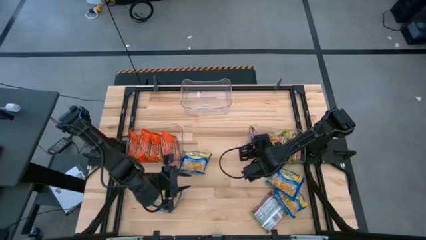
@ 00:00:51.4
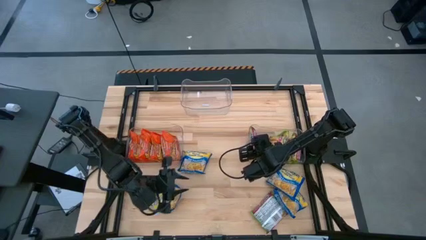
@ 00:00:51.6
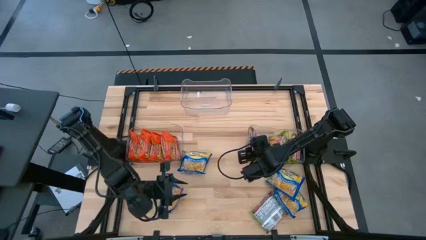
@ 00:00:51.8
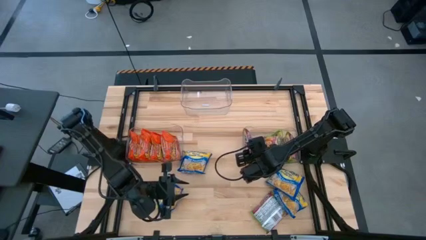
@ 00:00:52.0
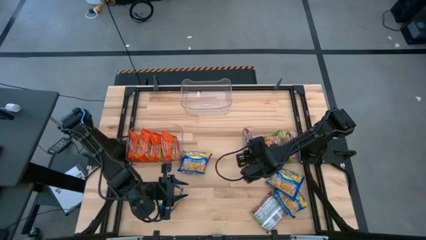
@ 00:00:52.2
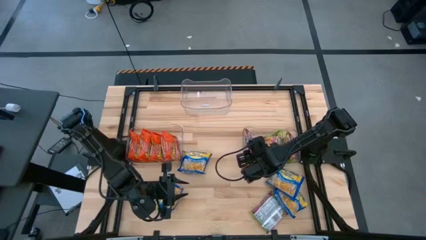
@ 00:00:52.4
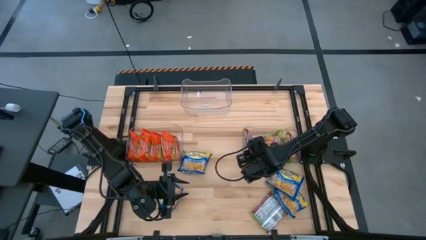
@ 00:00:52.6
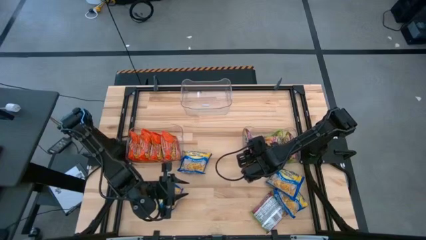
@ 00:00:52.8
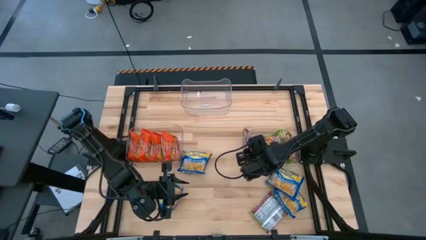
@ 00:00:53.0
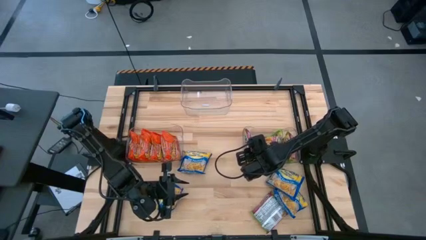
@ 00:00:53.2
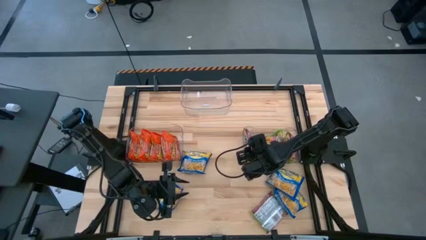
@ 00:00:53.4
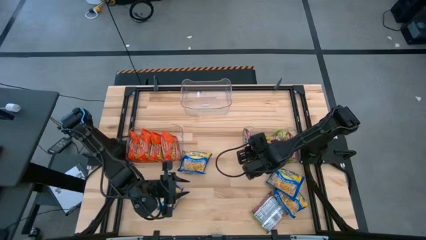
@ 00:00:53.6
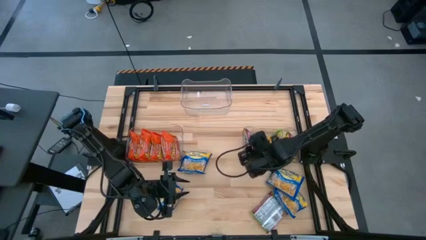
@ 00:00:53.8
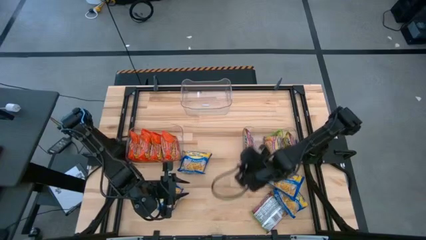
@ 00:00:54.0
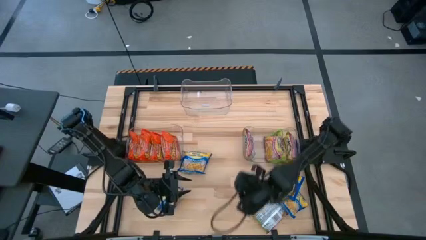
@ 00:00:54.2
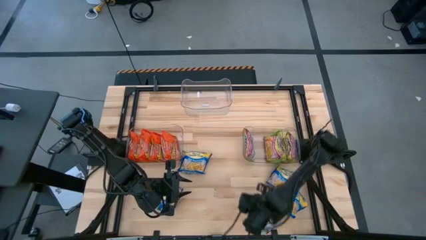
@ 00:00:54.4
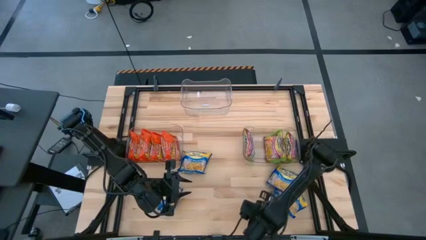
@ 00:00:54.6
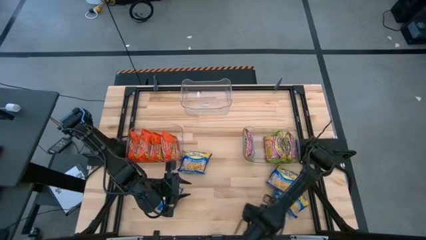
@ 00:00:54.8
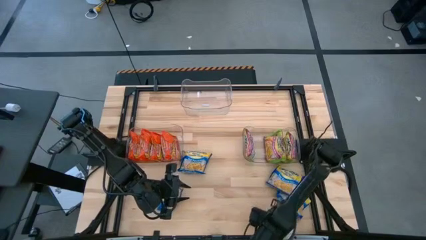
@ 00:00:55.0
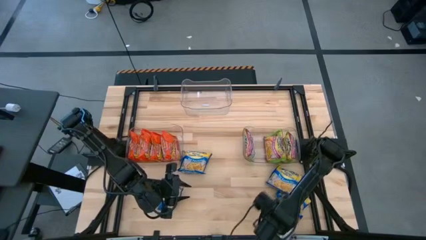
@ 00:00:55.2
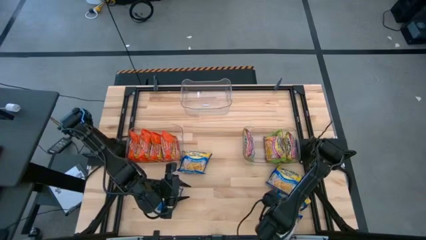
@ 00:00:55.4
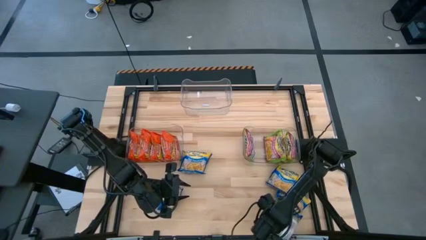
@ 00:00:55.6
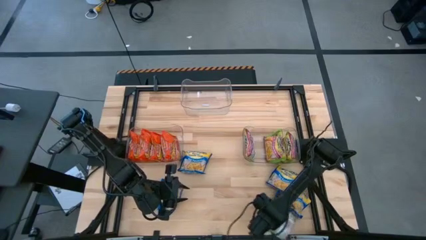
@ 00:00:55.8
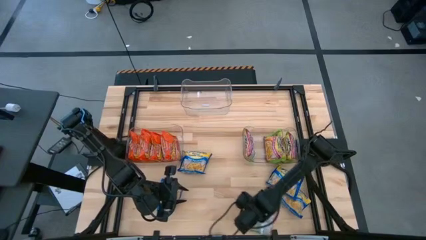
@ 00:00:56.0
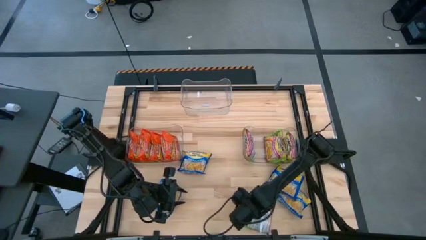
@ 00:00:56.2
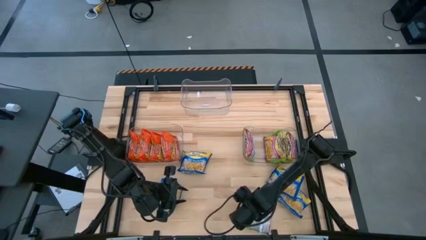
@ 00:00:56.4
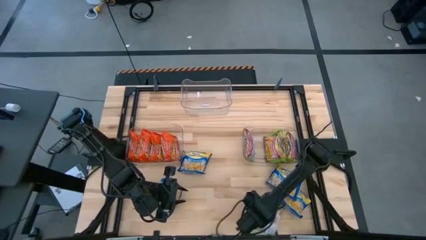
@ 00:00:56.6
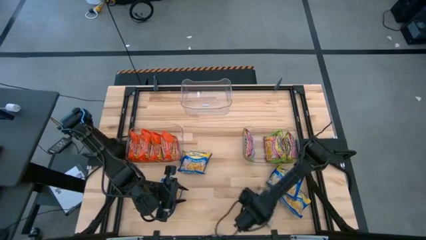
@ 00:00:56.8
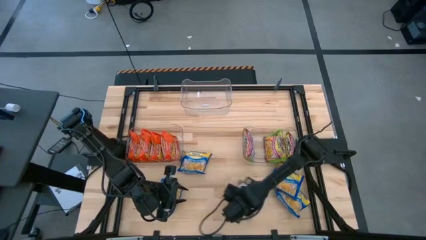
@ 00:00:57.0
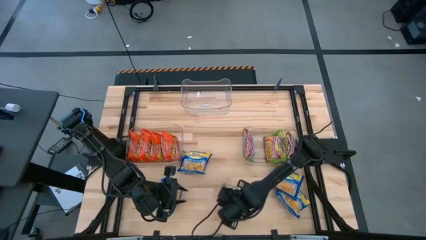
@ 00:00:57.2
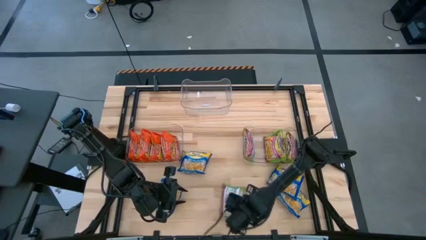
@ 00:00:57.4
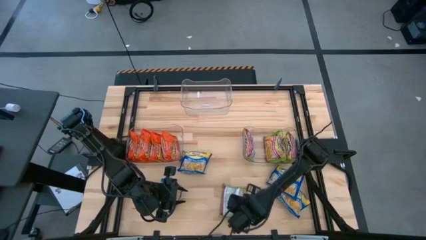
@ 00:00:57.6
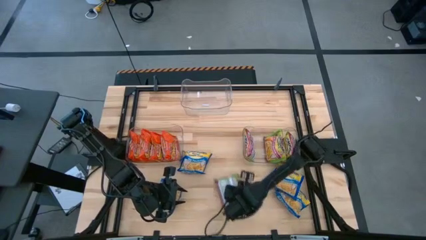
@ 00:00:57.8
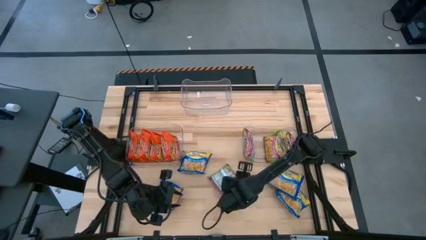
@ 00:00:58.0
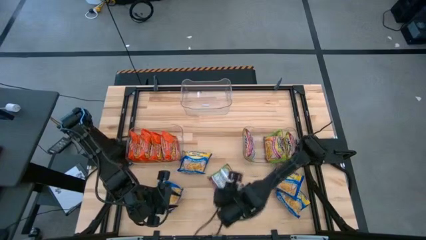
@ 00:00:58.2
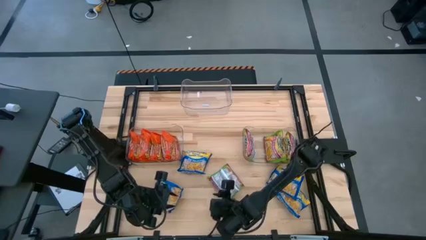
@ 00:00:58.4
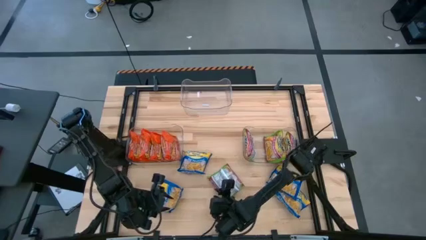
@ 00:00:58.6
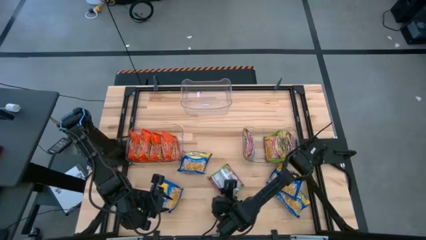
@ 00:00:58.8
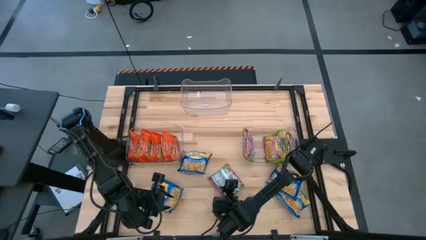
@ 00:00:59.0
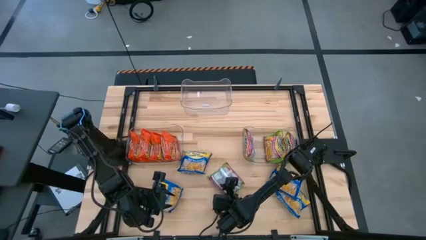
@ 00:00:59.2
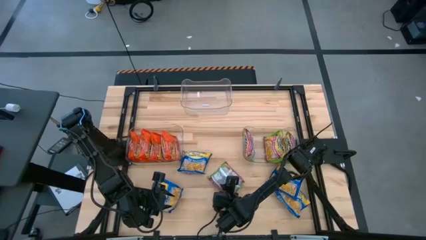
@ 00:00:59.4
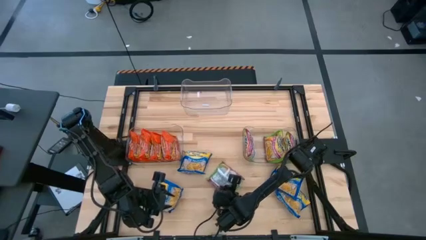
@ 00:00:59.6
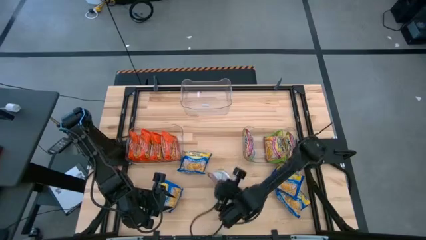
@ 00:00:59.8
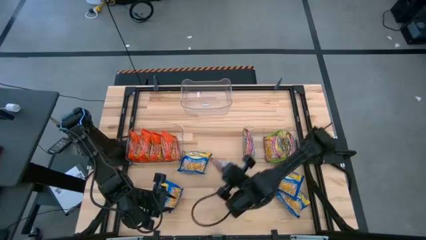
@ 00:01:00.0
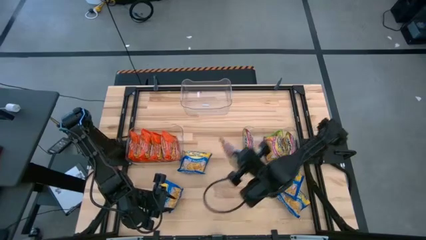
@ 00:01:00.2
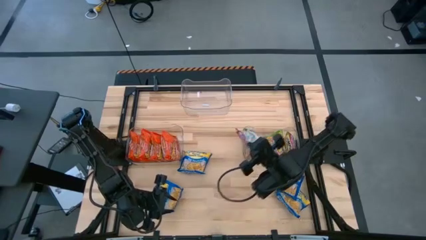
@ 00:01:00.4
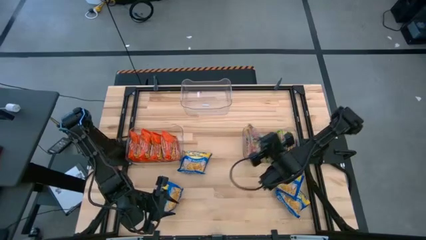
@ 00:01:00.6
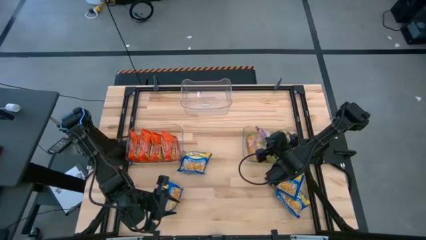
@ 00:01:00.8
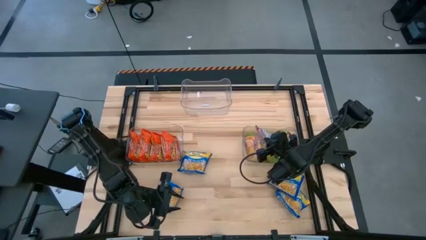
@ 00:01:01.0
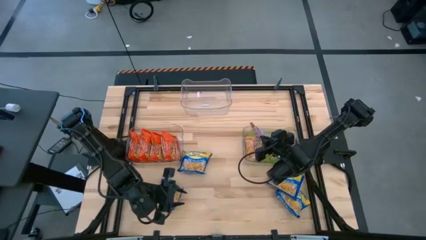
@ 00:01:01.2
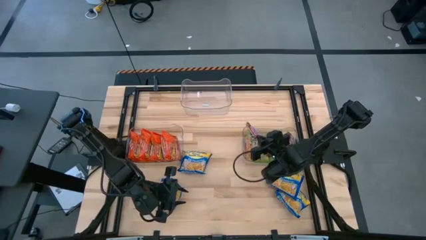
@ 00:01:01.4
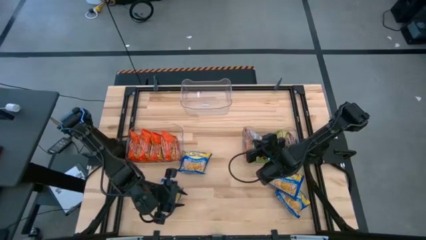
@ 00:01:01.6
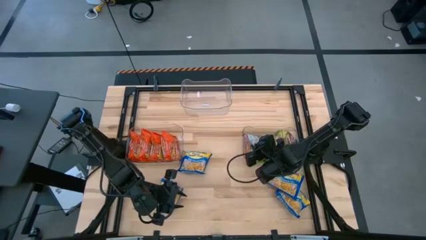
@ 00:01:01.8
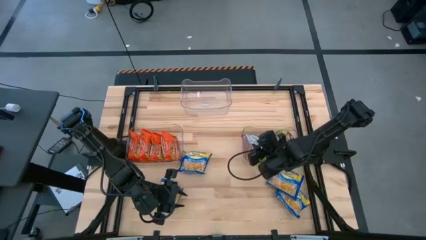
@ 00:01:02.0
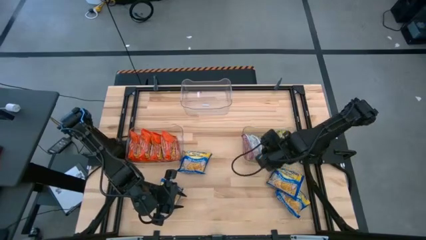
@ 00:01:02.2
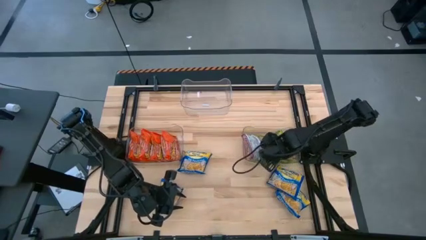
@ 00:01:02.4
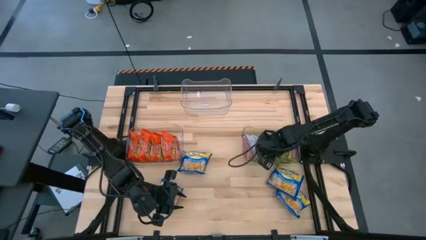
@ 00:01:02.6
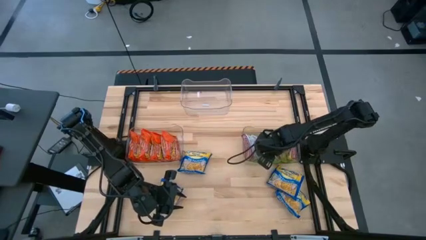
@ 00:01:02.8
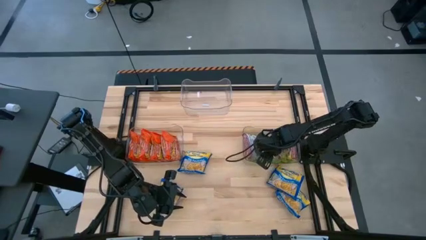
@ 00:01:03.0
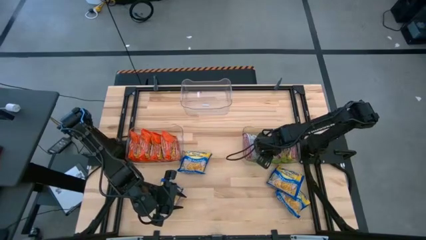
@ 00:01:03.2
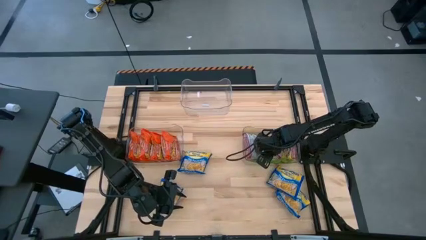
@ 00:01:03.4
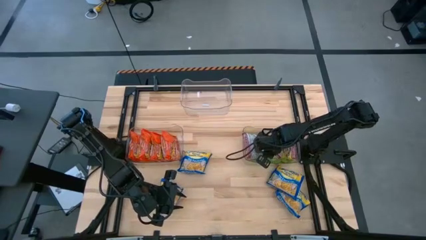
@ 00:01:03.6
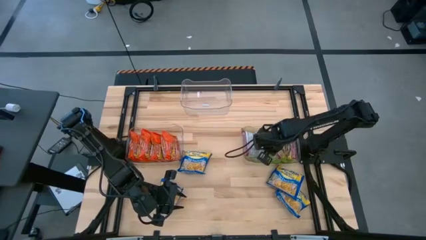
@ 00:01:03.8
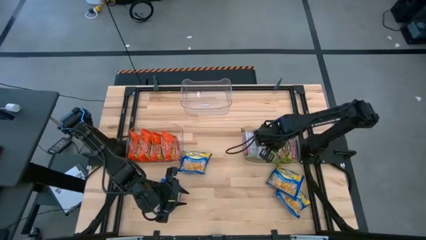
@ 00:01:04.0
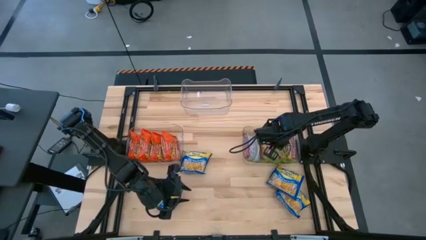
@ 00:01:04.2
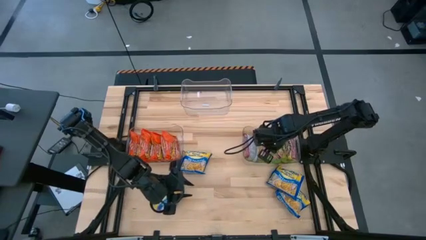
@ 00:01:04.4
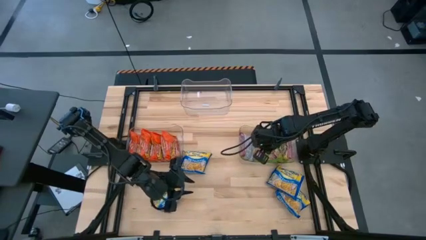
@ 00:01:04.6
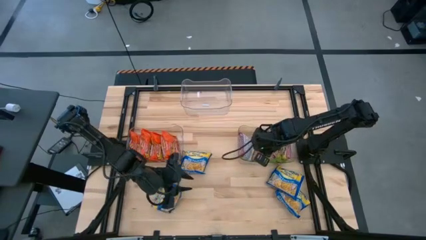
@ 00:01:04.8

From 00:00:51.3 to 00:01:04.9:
Task: Sort Maruchan noodles
Put the green noodle from the bottom into the middle right transparent bin

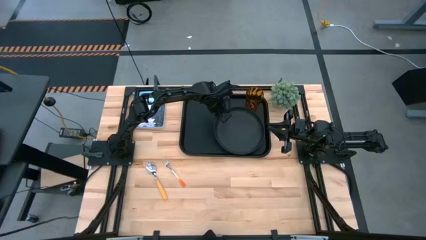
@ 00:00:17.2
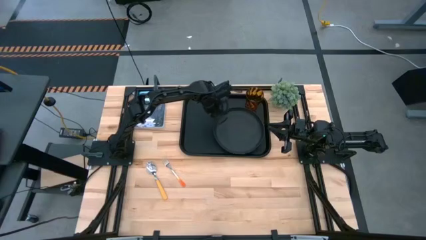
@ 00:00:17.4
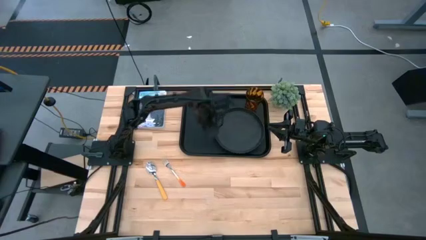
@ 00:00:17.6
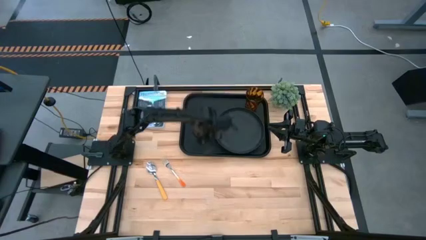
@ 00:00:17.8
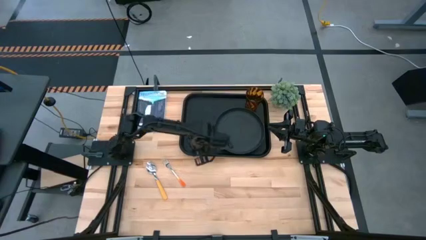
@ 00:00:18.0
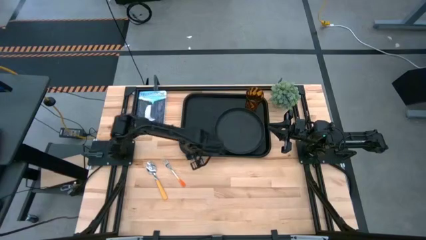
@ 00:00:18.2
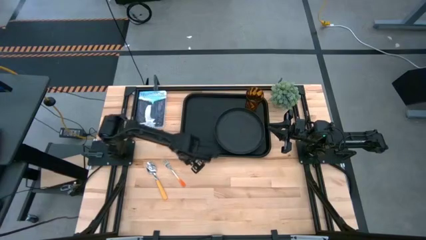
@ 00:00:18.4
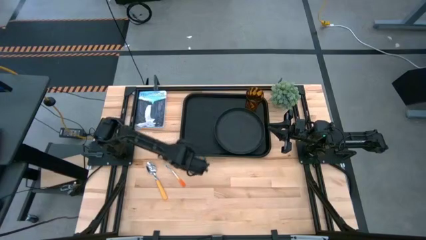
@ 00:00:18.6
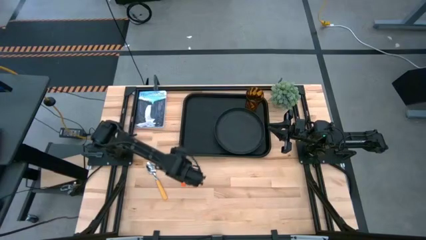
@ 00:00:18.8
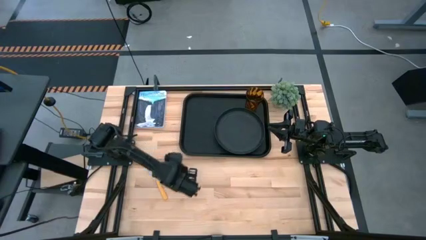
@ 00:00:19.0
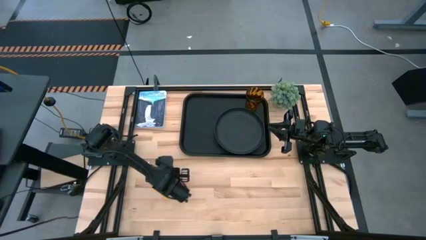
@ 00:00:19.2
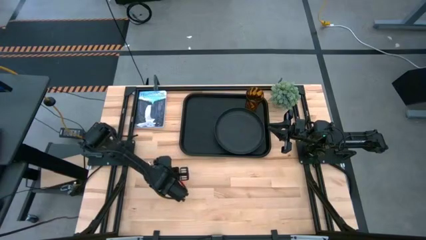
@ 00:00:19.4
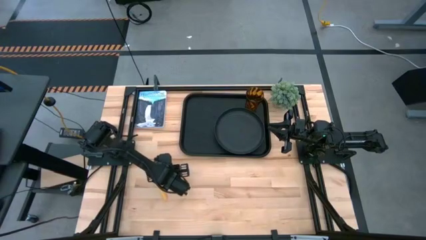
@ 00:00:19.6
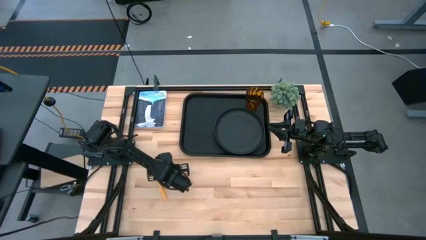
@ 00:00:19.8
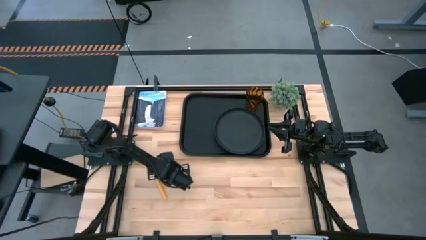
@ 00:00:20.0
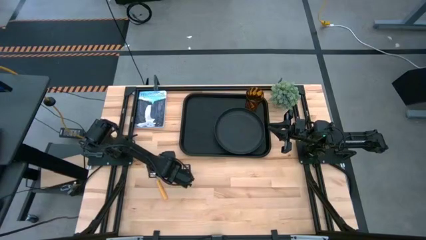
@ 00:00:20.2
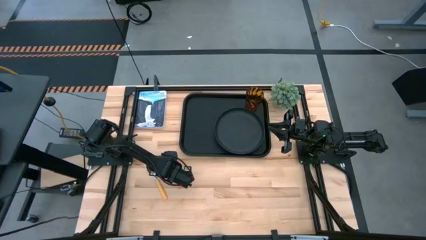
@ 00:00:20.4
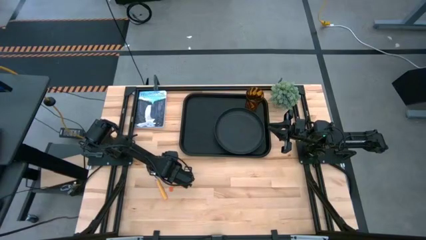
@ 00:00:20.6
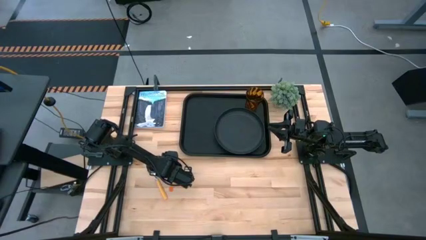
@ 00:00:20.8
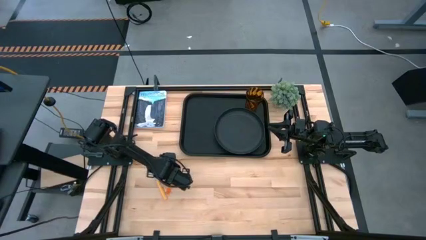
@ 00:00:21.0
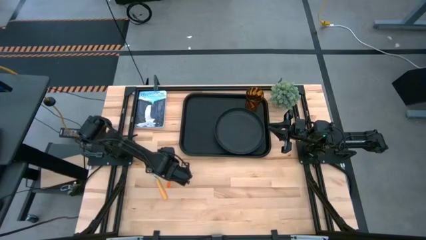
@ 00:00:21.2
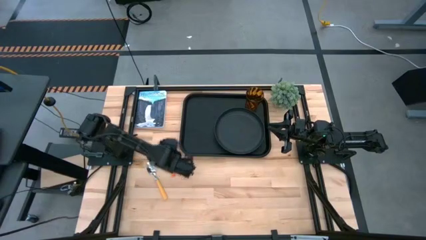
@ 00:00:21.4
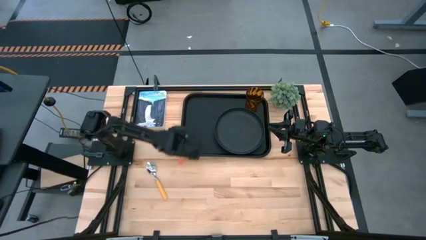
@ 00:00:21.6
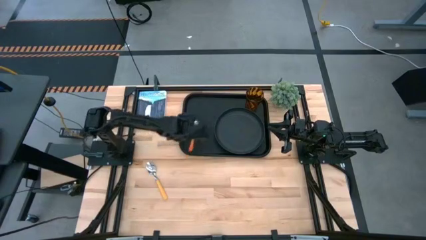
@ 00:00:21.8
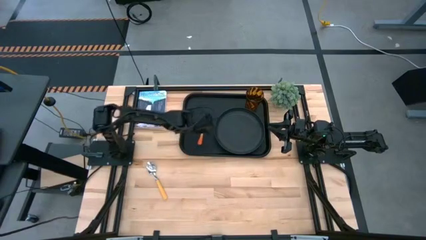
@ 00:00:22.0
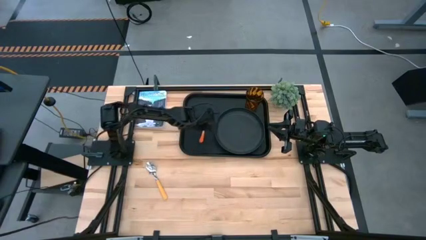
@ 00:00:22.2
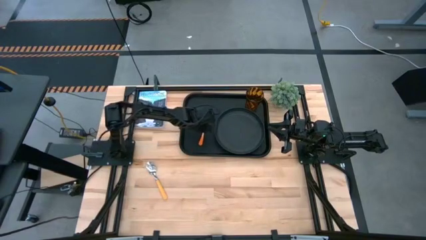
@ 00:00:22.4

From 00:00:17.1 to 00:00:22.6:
Task: Pick and place plate/cup/fork/spoon on tray
Put the orange fork on the black food tray
